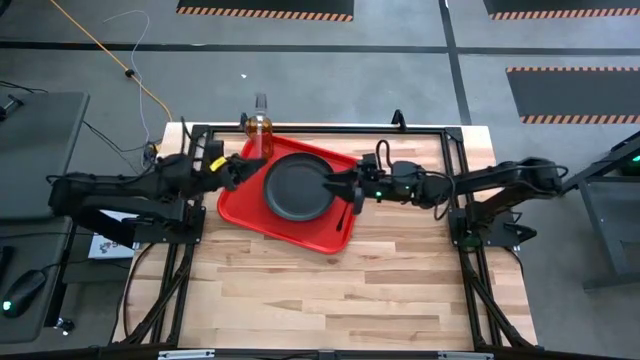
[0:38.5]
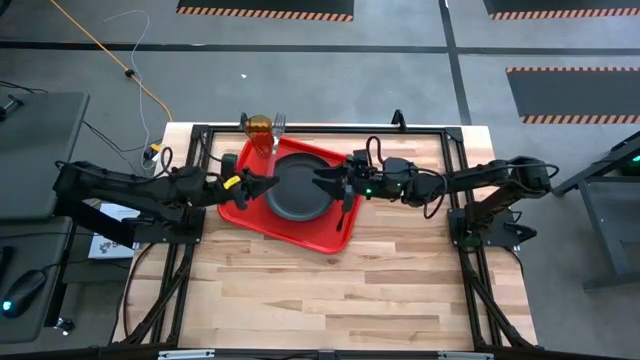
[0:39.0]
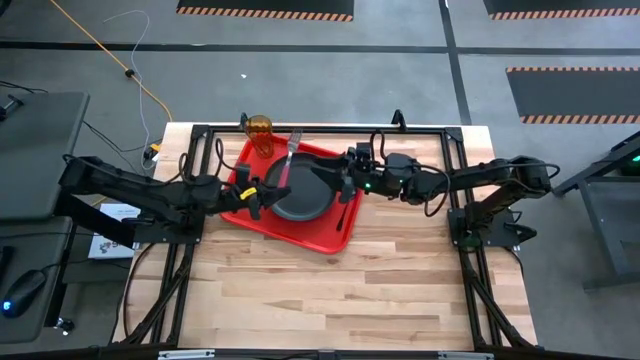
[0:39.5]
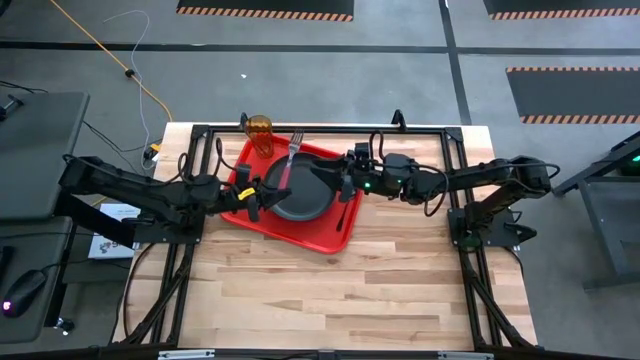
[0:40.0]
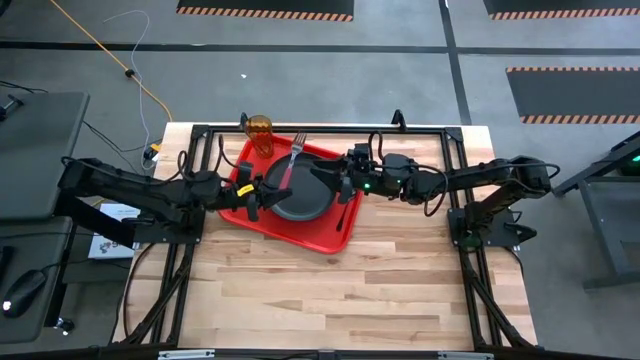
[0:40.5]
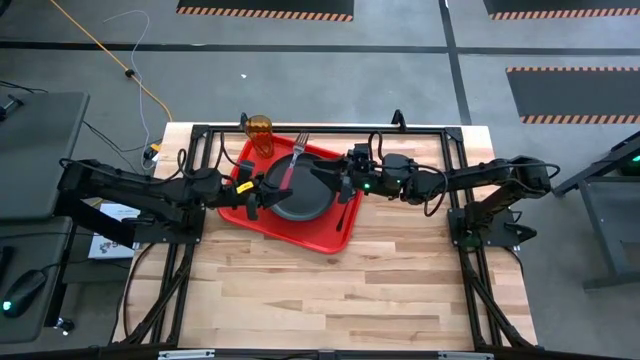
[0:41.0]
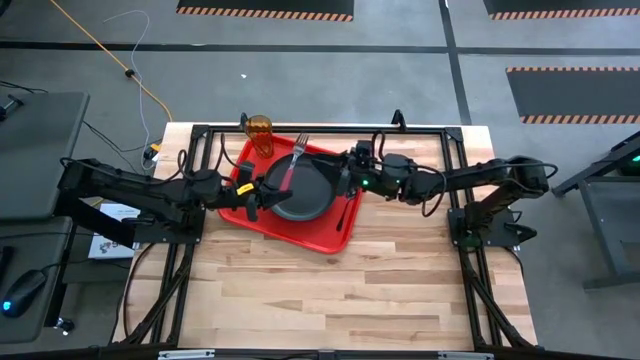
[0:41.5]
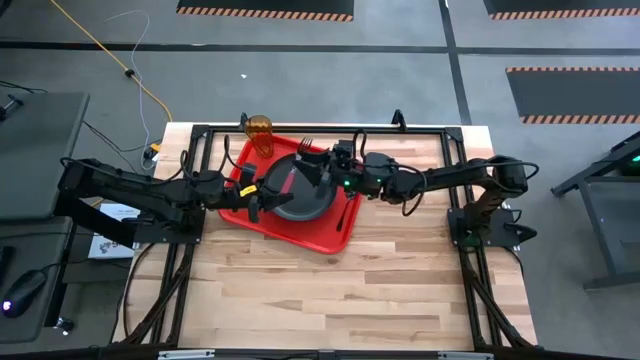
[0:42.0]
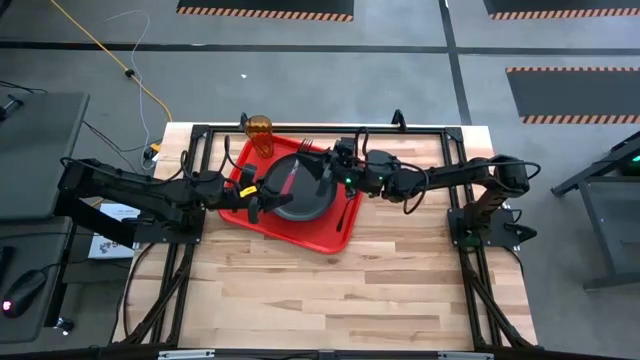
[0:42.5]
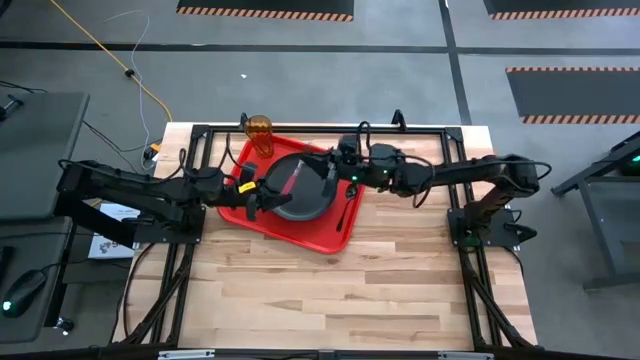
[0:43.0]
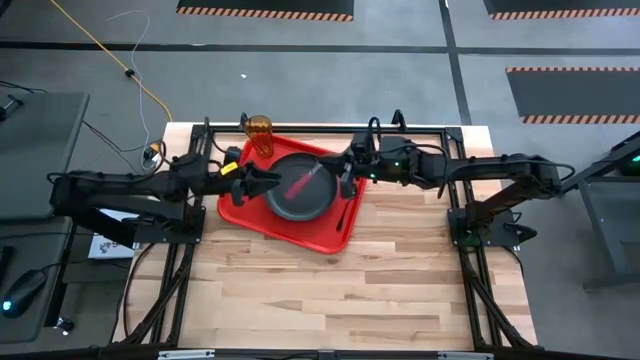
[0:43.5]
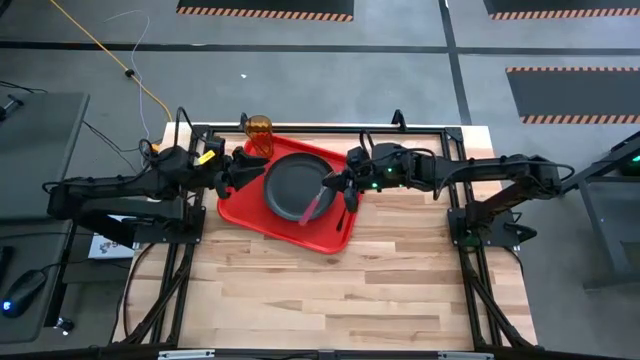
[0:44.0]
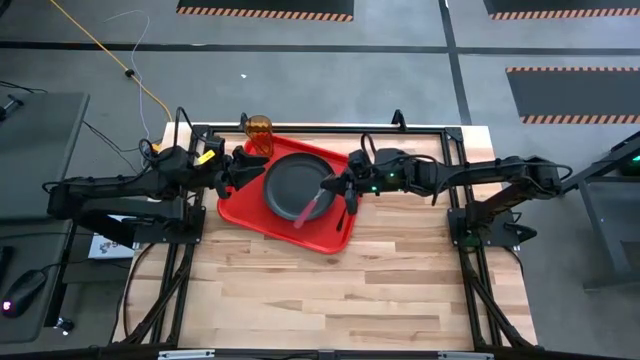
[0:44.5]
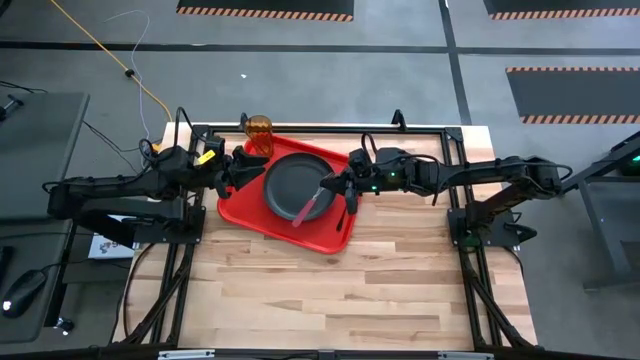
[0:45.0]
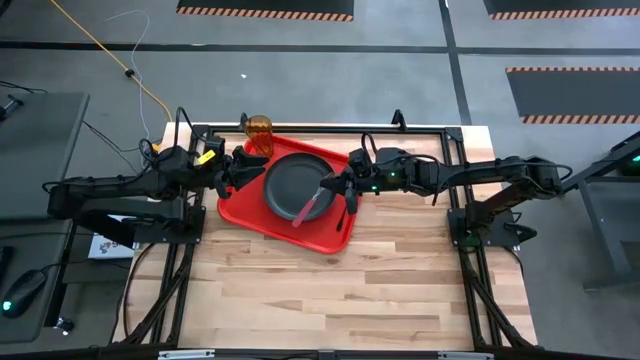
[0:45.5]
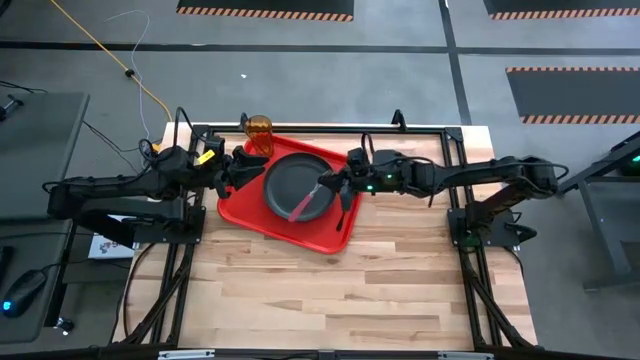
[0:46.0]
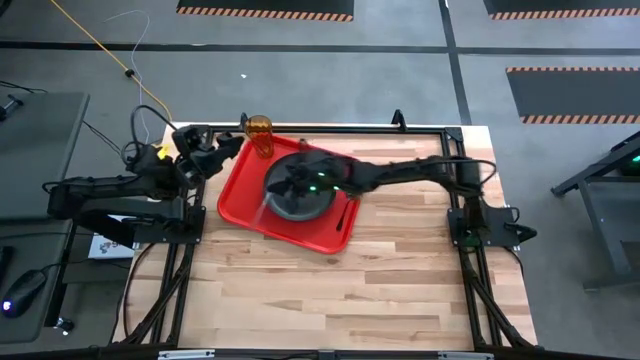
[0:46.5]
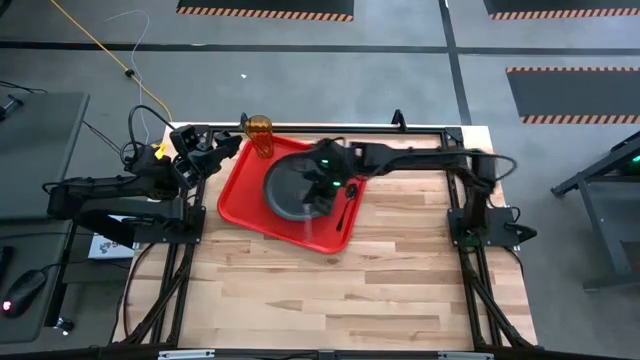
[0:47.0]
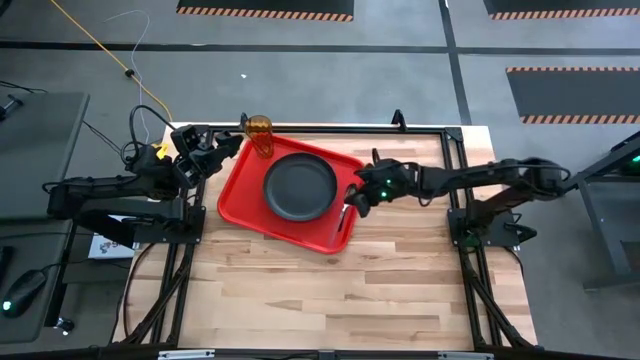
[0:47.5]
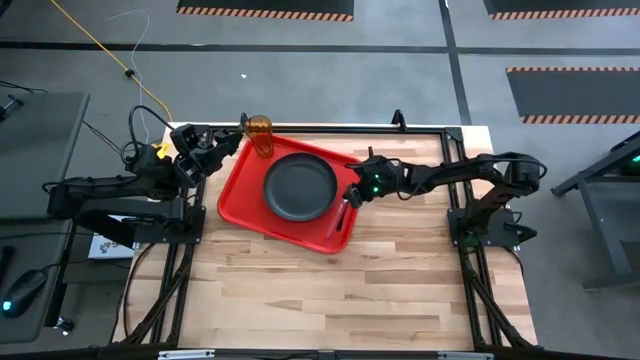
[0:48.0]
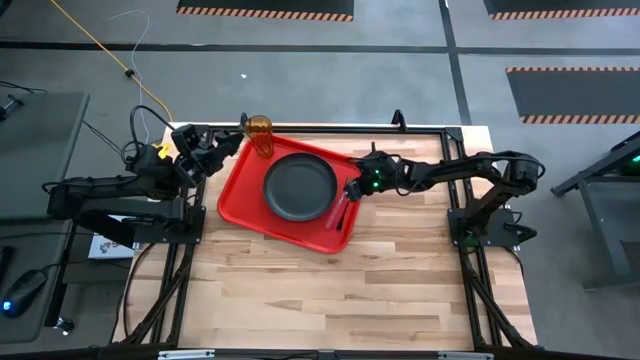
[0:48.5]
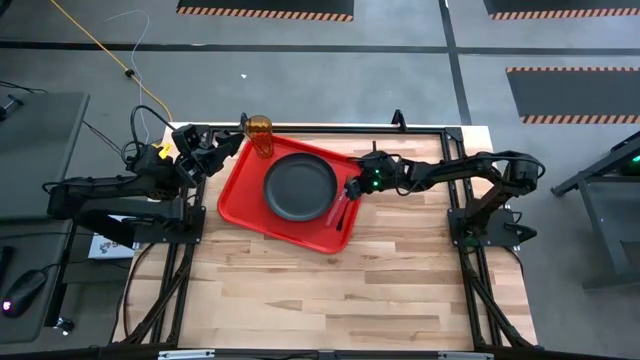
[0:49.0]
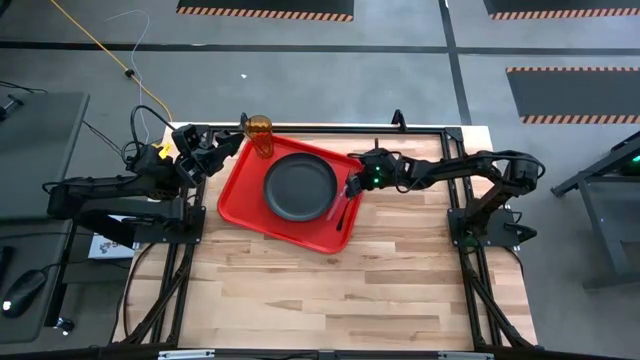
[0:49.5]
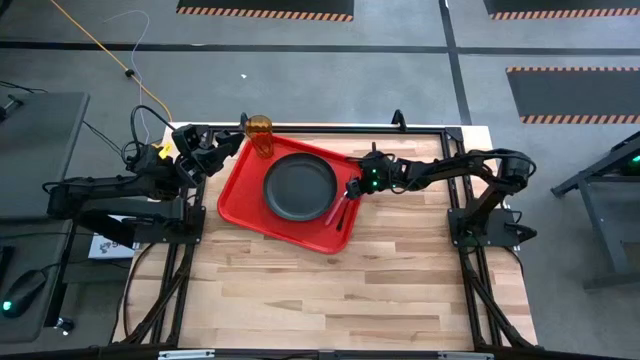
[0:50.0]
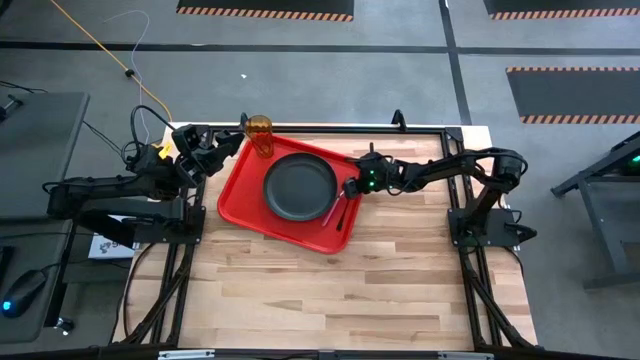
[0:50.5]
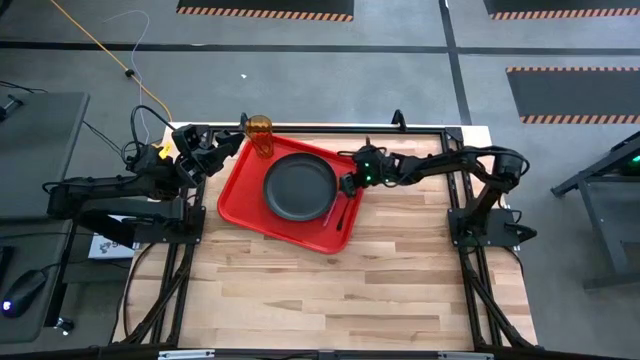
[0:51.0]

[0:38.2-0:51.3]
Task: Pick and place plate/cup/fork/spoon on tray
Put the pink fork on the red serving tray

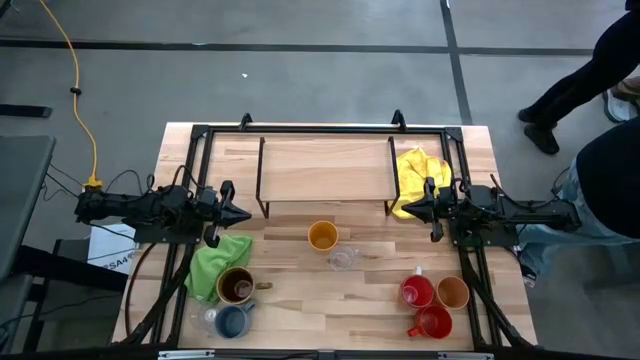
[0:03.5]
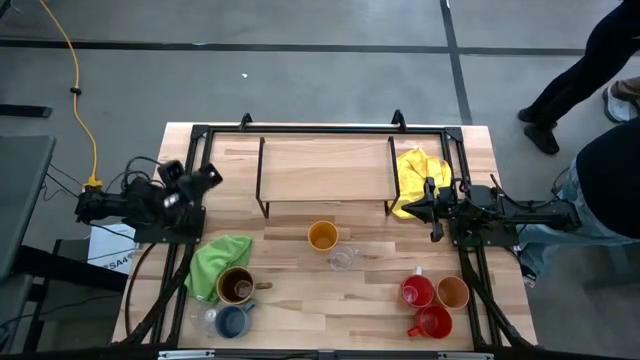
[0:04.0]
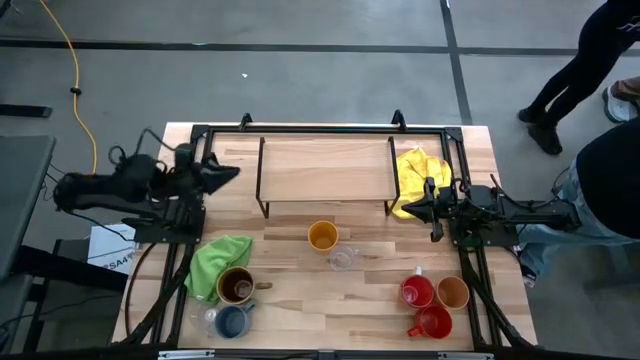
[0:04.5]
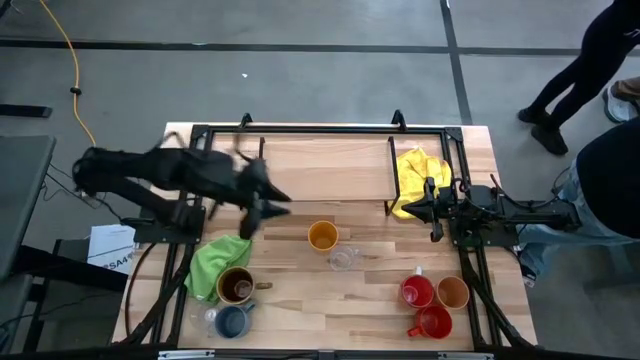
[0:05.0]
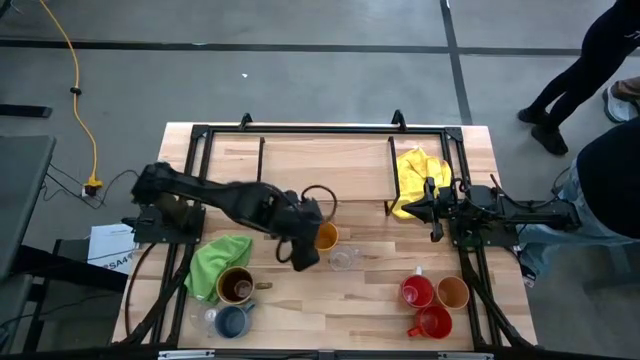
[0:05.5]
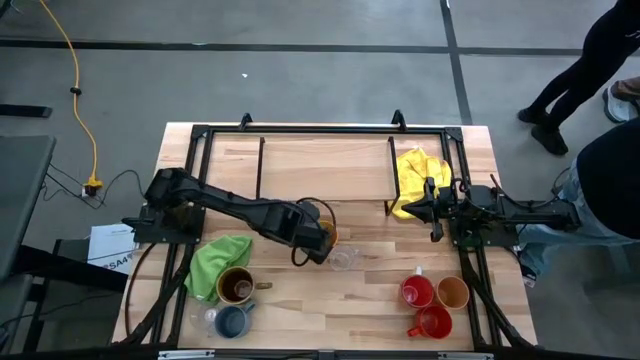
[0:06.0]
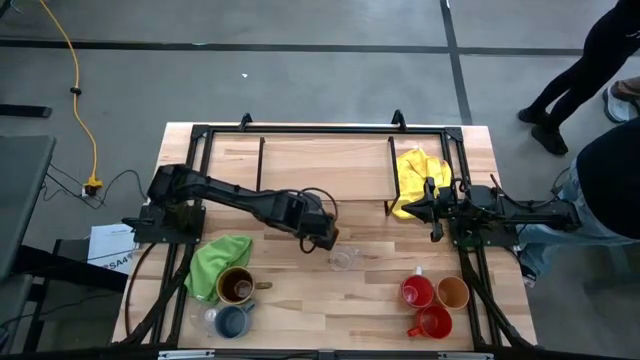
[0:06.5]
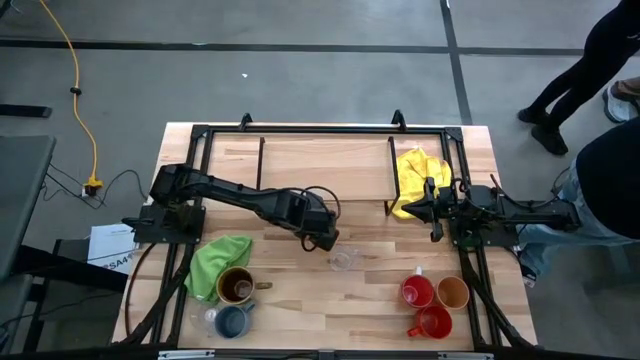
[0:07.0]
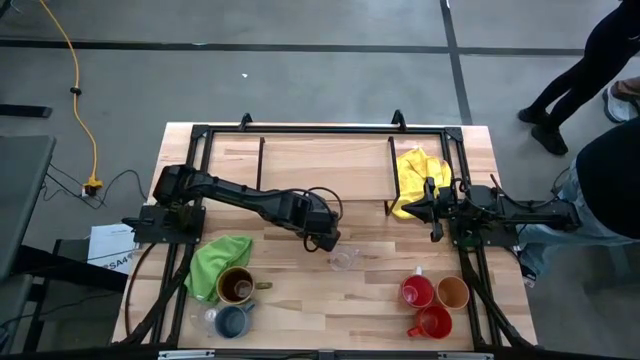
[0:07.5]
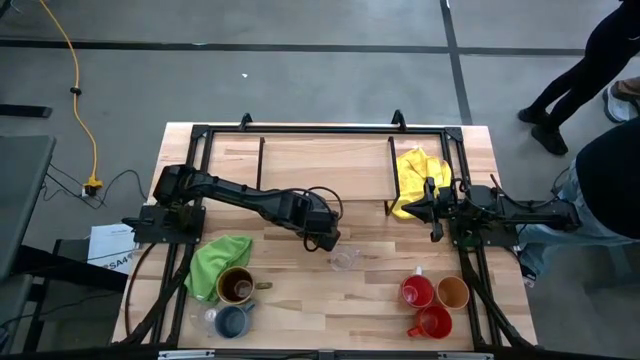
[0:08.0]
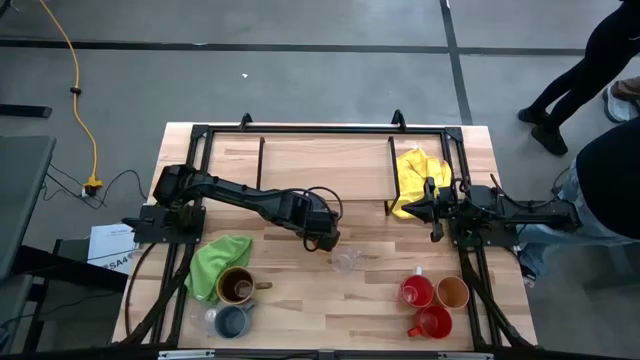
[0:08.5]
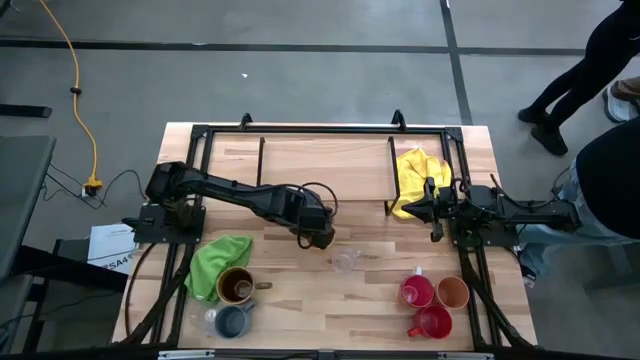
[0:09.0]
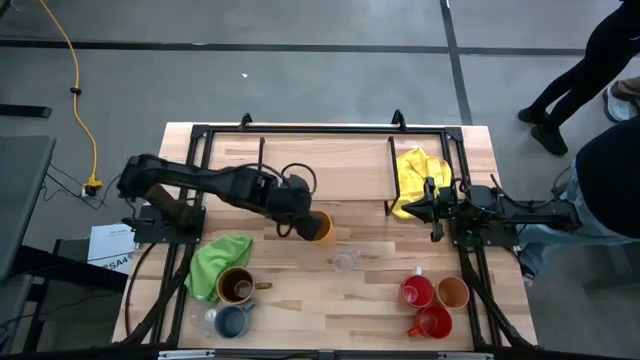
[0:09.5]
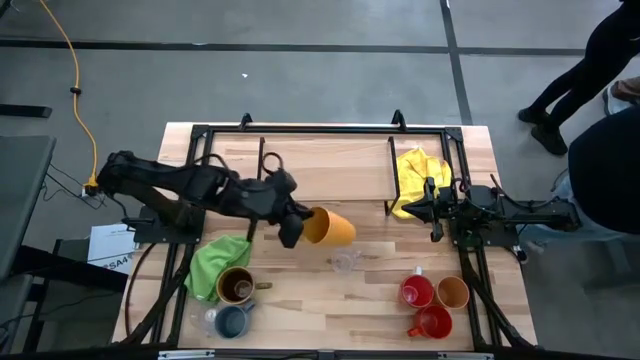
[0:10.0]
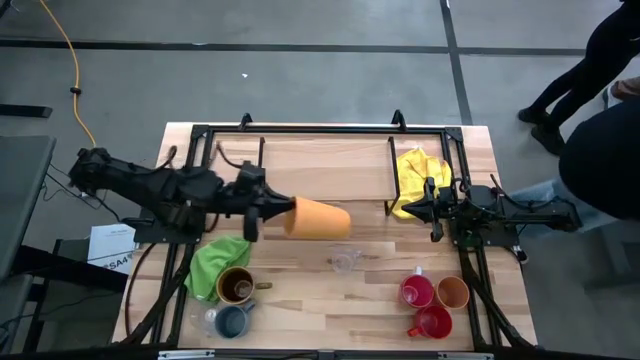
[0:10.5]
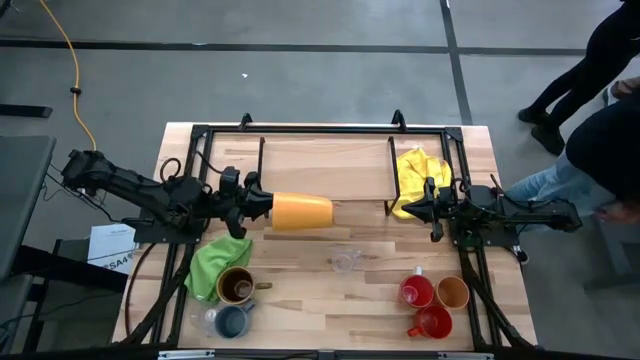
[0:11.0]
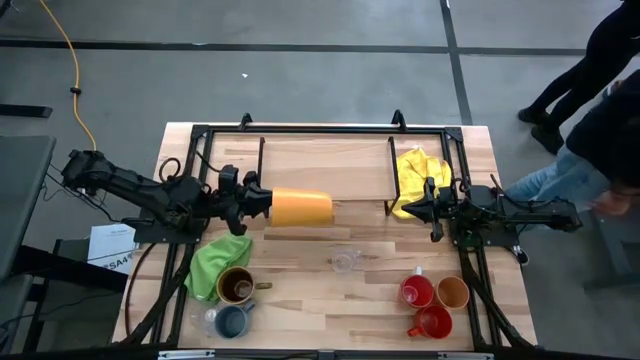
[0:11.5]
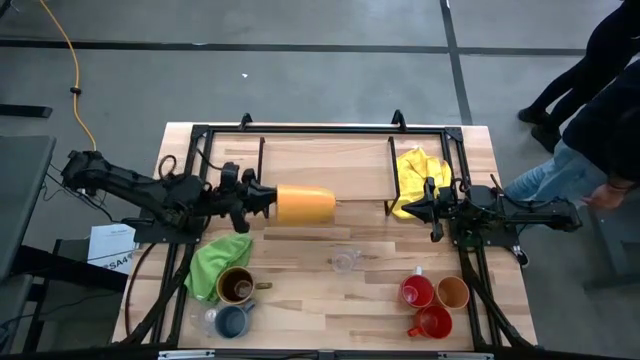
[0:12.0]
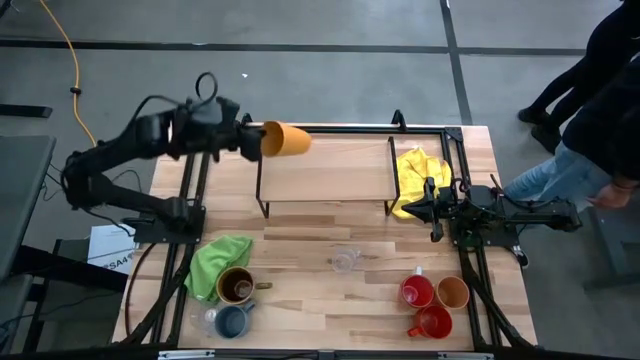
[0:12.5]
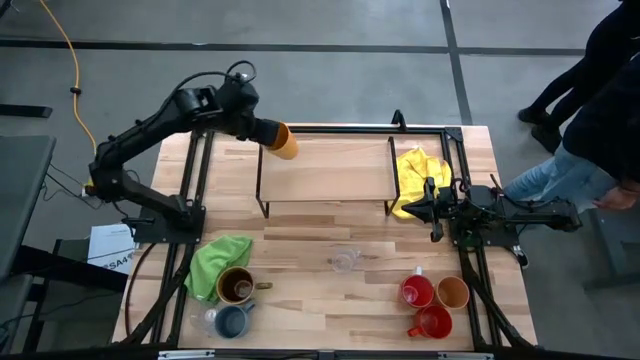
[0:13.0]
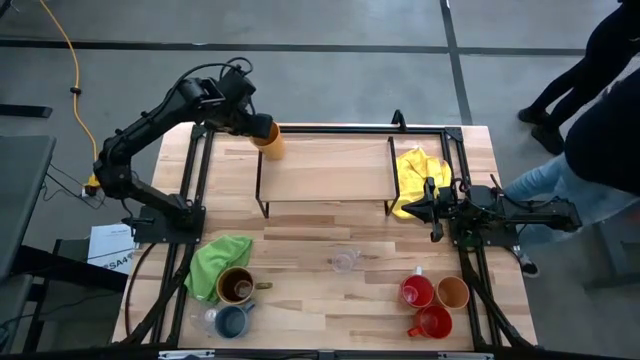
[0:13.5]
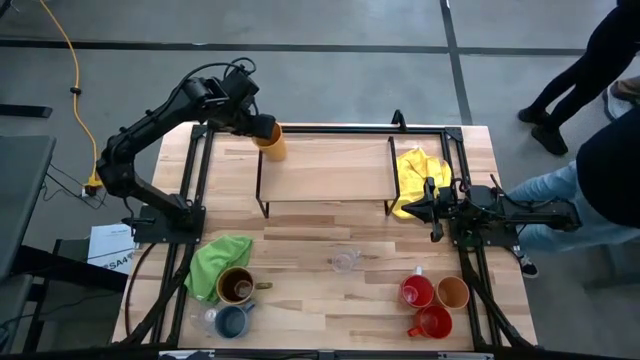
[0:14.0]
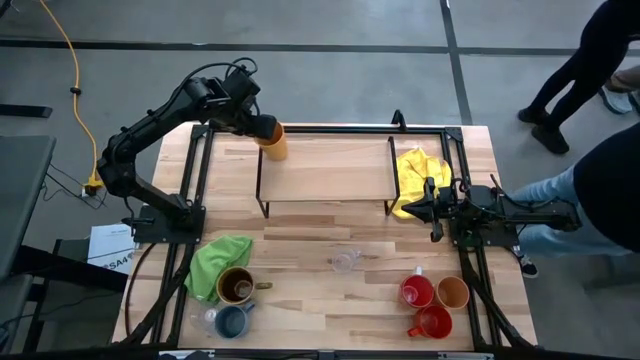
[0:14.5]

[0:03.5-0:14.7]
Task: Stack small to large cups/mugs on shelf
Put the yellow cup on the shelf
